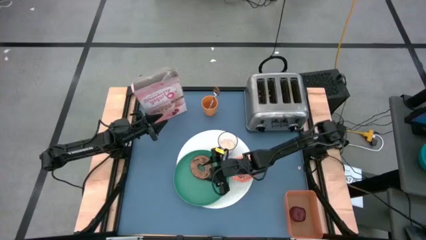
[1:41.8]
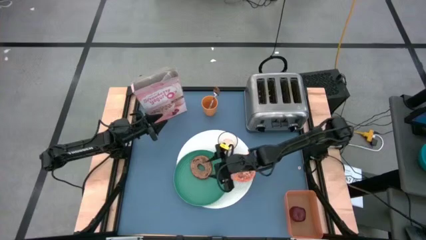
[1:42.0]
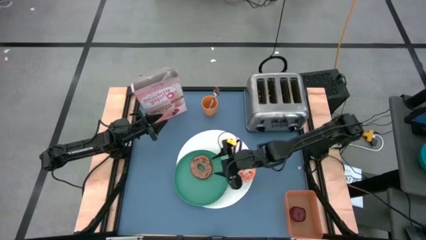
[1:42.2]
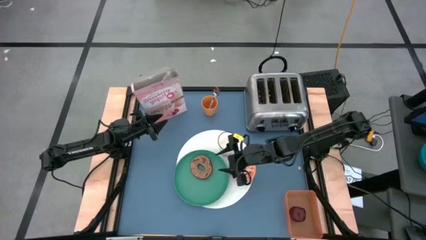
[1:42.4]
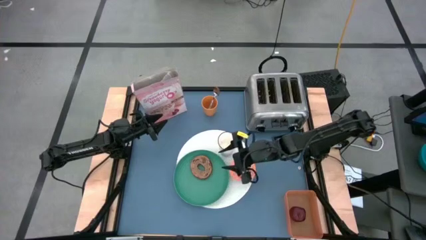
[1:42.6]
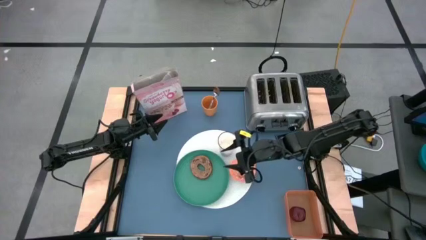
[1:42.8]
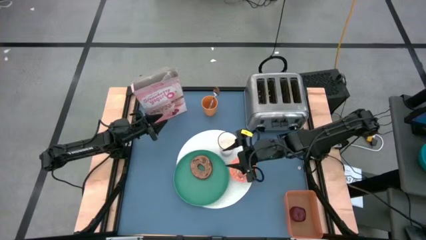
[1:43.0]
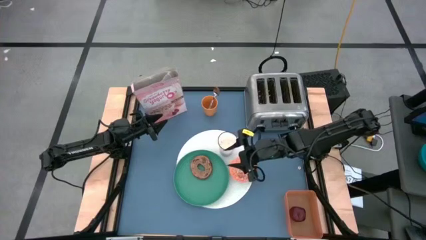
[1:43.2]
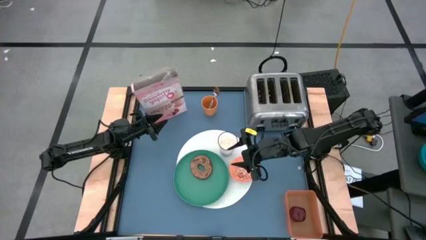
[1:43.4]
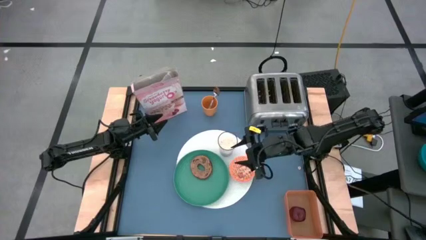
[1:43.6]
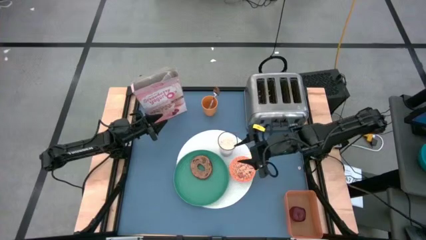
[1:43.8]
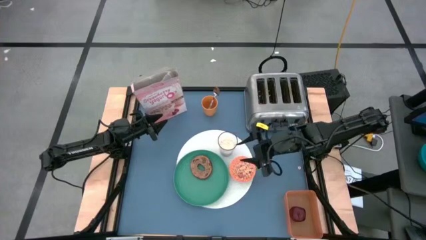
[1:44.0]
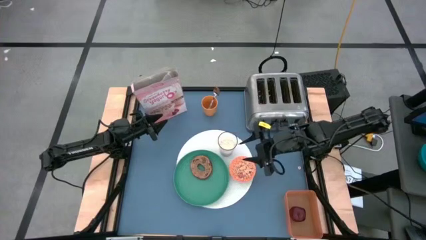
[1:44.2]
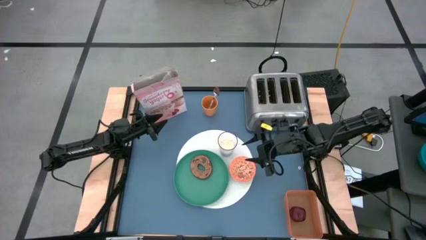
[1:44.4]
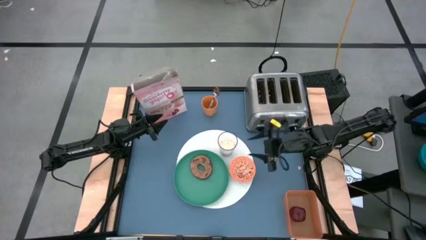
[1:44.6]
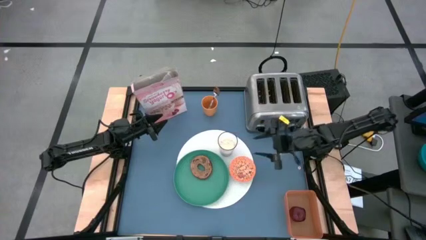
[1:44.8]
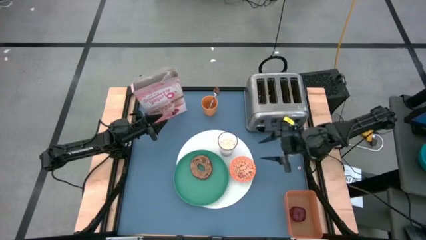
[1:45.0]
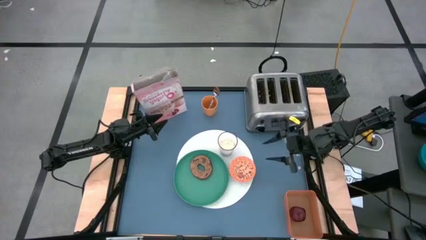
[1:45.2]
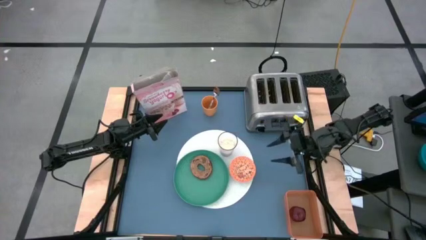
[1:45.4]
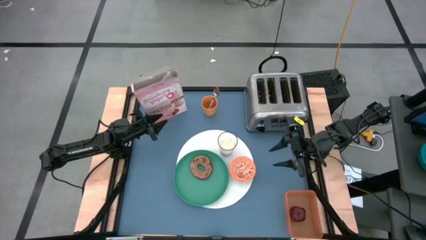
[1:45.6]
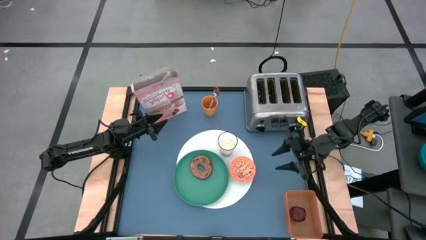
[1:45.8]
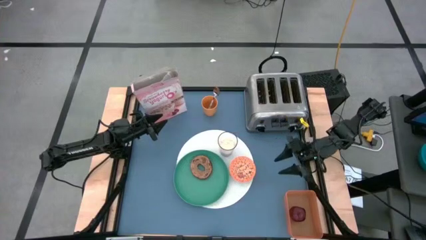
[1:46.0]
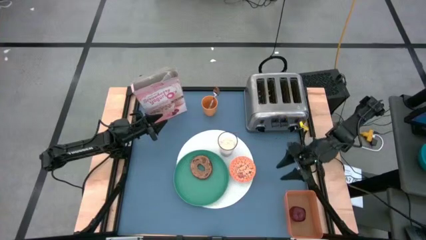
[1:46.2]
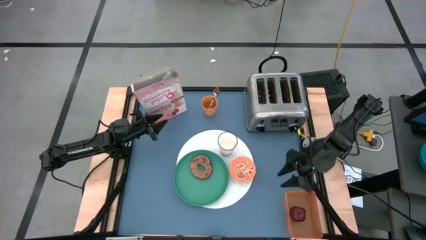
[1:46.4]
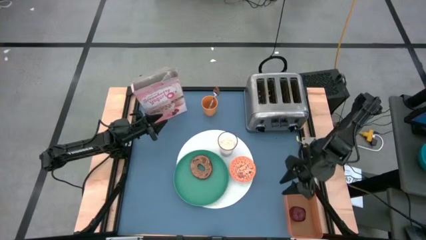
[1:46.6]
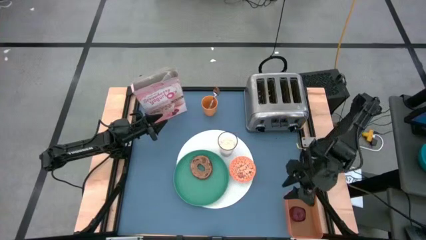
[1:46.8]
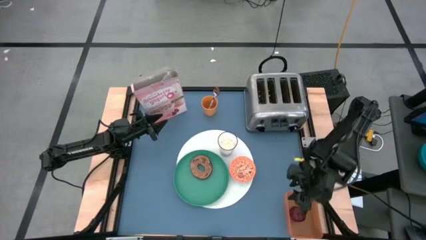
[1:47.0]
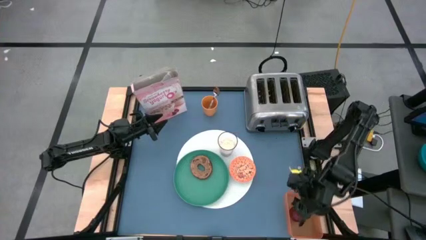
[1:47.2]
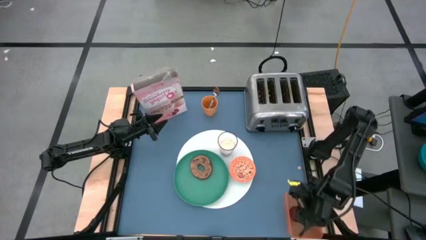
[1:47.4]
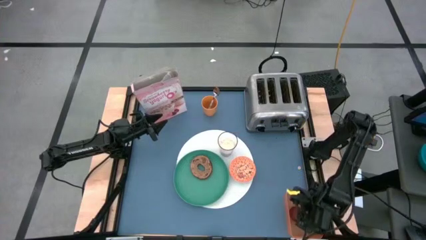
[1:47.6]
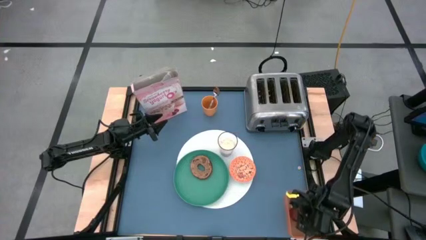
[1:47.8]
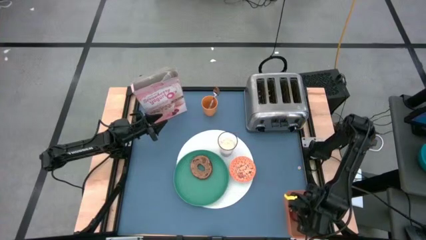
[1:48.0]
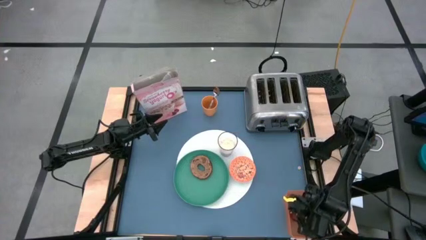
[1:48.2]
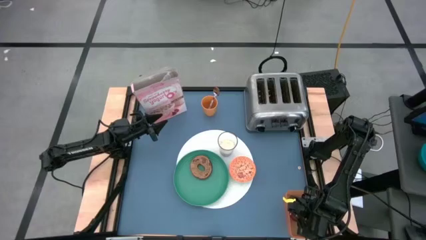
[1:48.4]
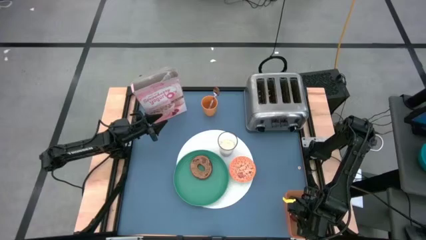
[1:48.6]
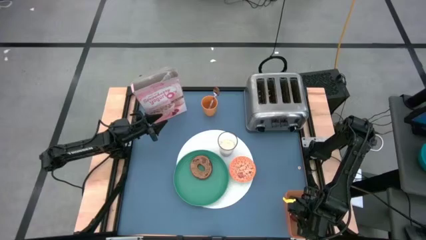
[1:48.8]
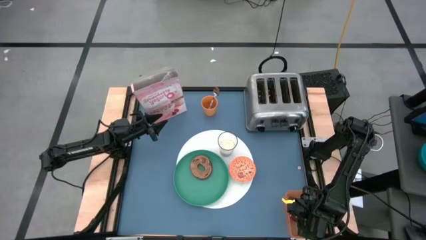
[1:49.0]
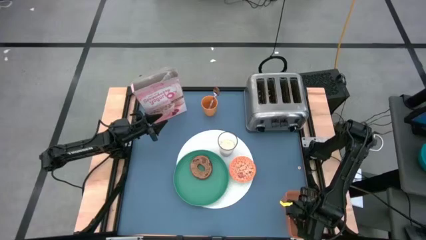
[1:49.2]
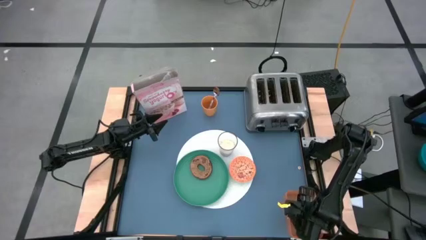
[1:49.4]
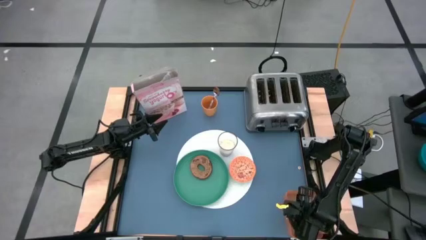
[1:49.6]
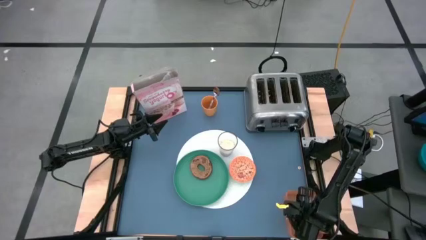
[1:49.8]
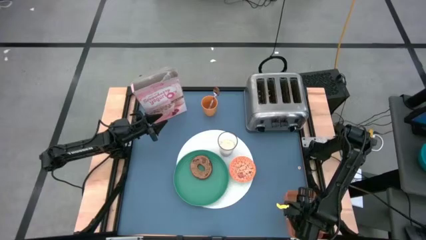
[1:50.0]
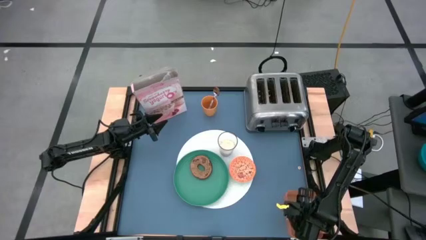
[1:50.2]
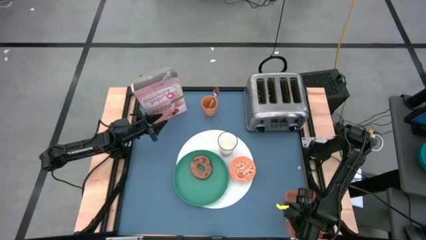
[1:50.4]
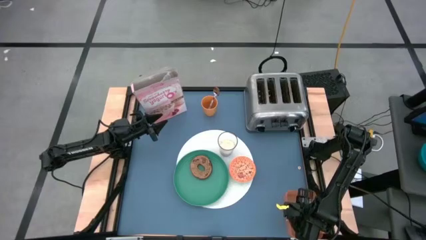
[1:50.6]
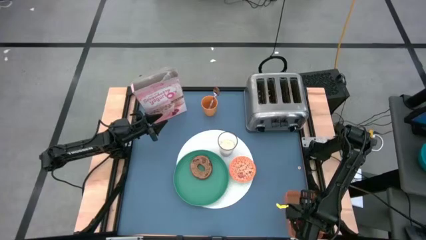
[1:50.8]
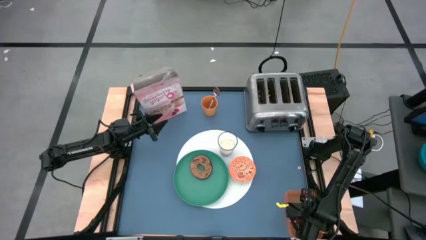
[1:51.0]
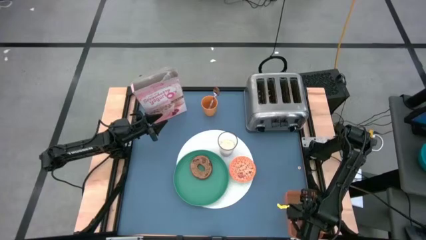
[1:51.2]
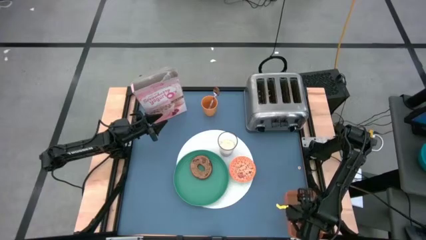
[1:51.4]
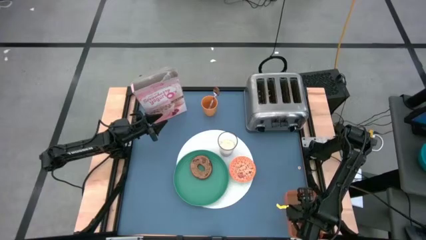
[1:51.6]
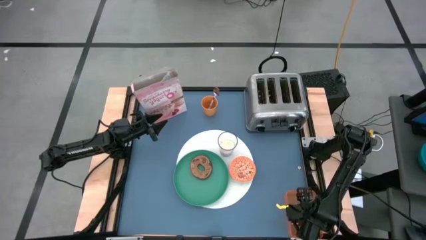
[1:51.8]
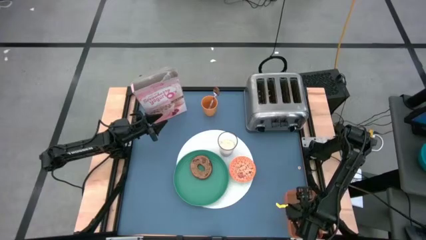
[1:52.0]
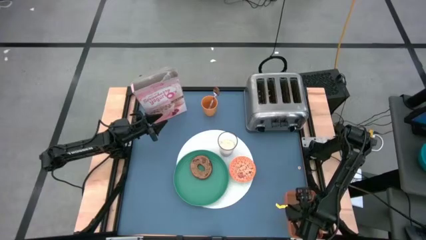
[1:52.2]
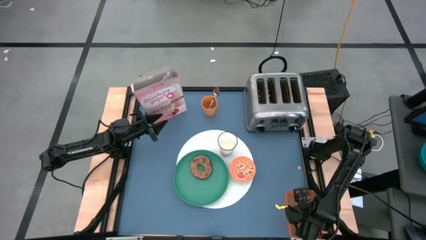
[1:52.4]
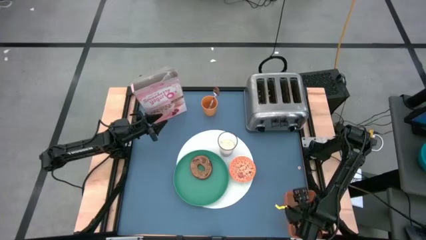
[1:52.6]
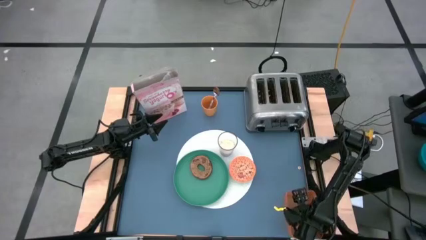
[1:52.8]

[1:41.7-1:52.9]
Task: Arrange a breakfast setting
Put the red apple on the green plate
